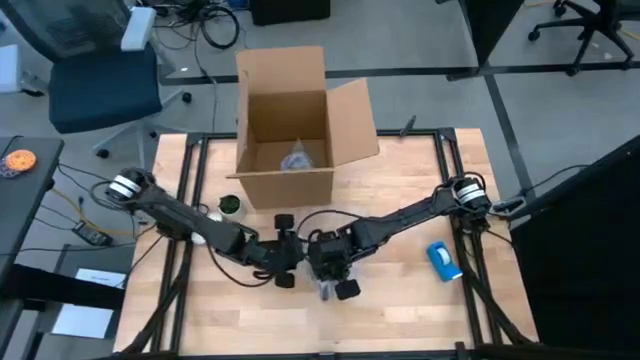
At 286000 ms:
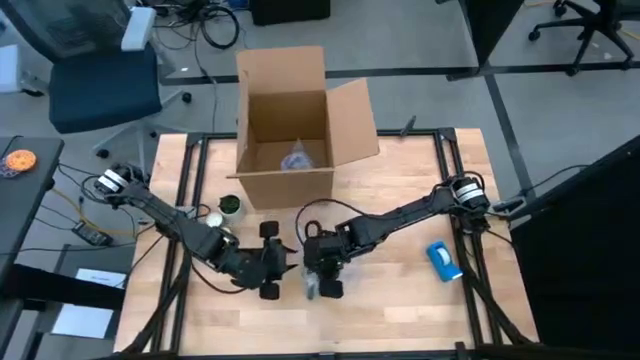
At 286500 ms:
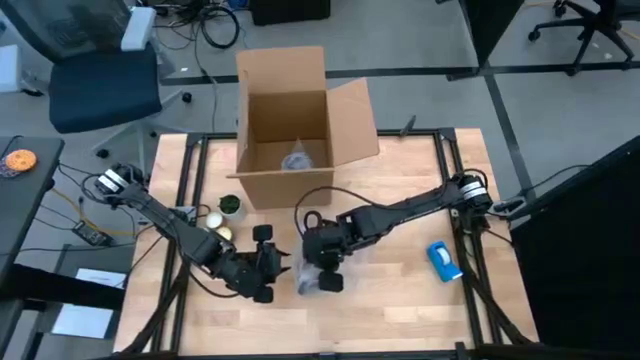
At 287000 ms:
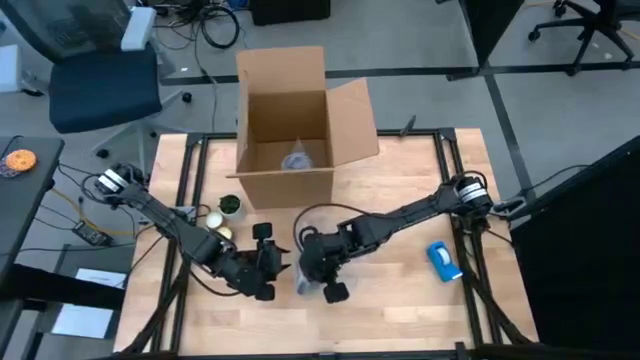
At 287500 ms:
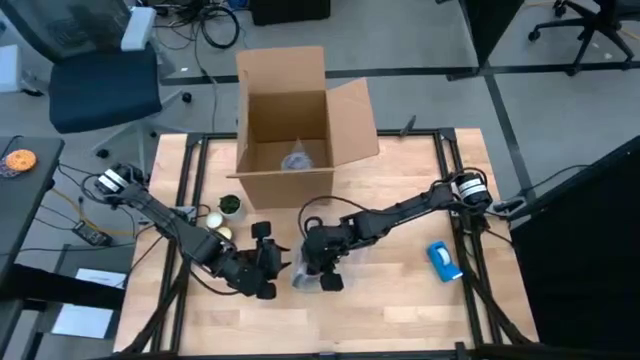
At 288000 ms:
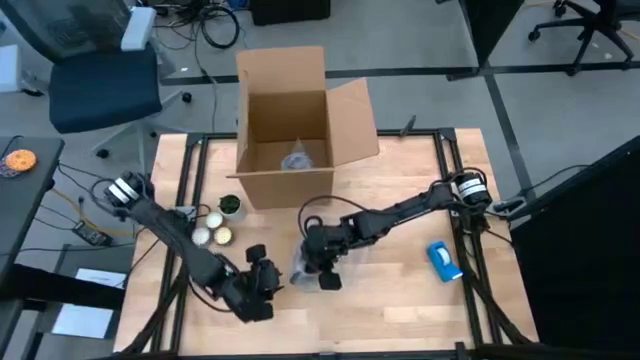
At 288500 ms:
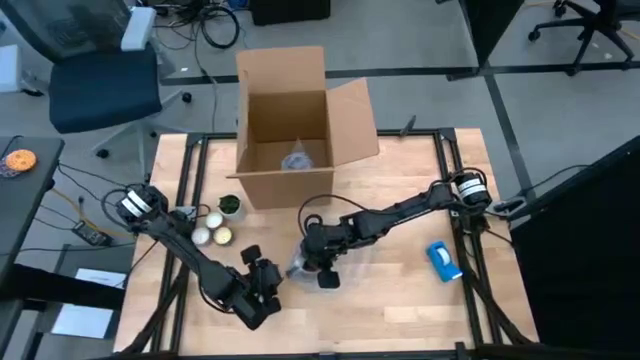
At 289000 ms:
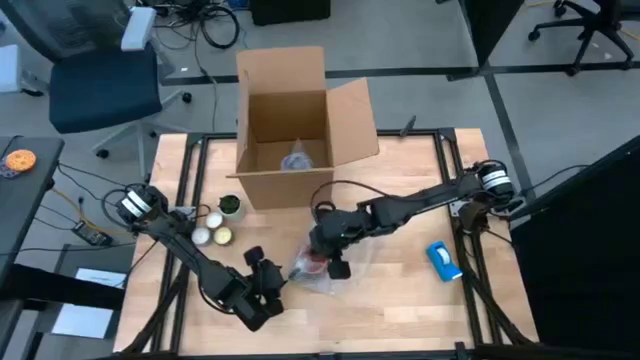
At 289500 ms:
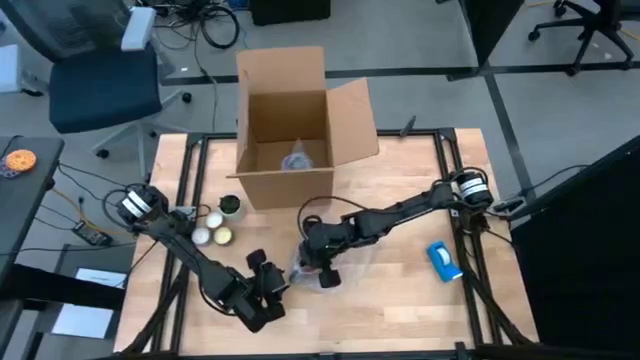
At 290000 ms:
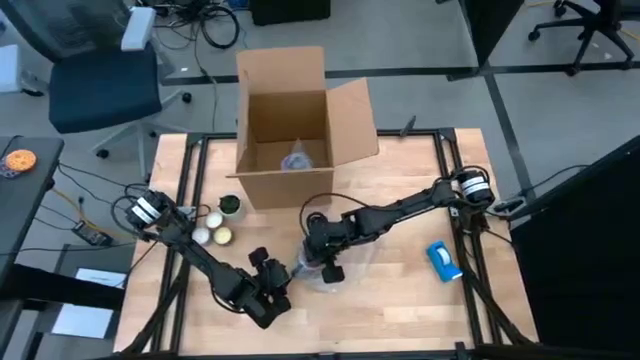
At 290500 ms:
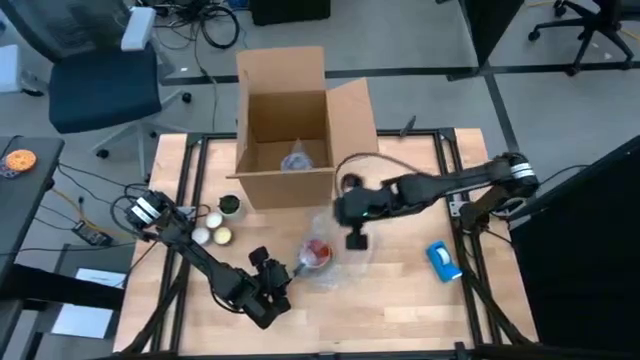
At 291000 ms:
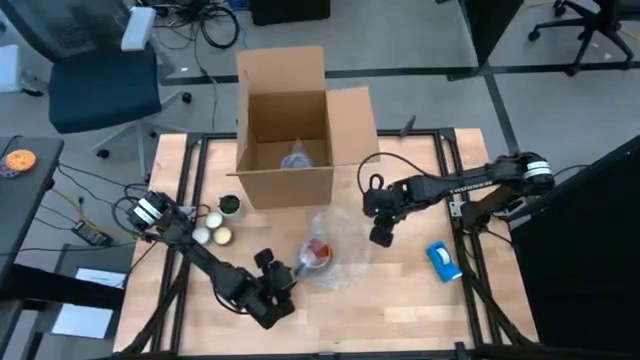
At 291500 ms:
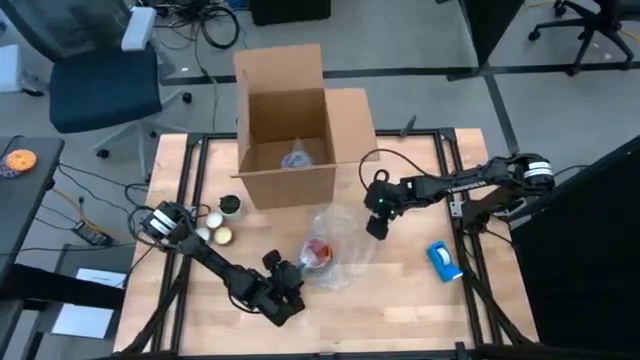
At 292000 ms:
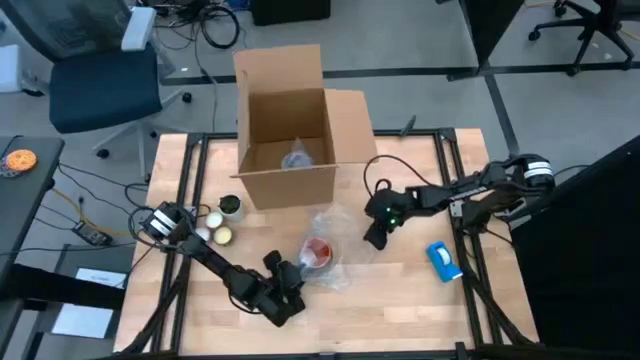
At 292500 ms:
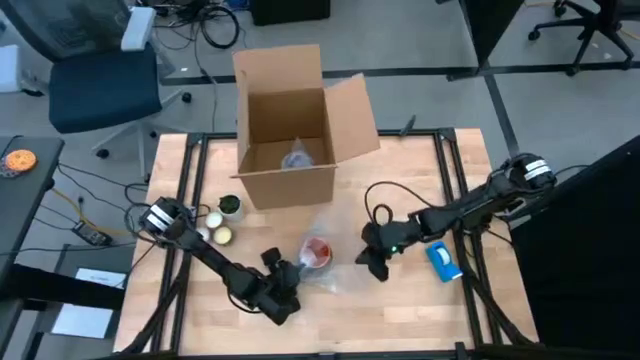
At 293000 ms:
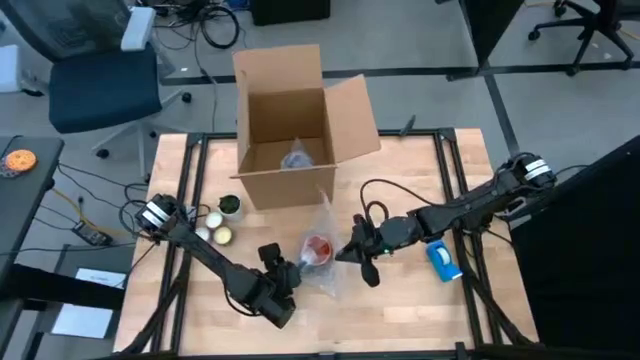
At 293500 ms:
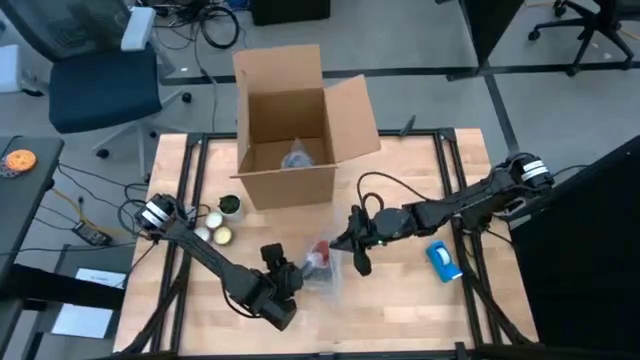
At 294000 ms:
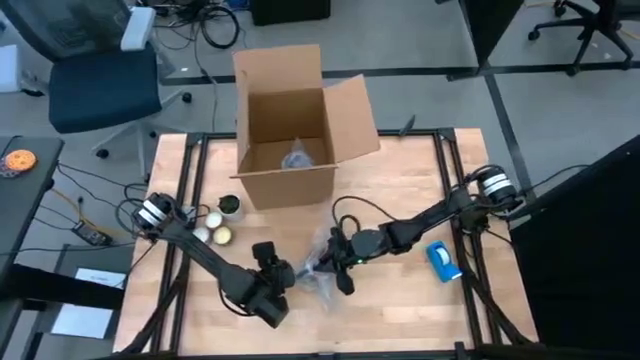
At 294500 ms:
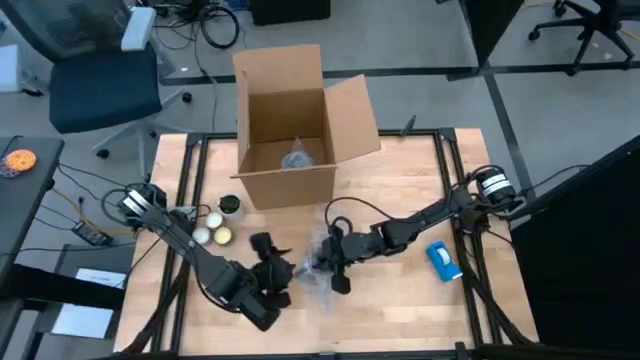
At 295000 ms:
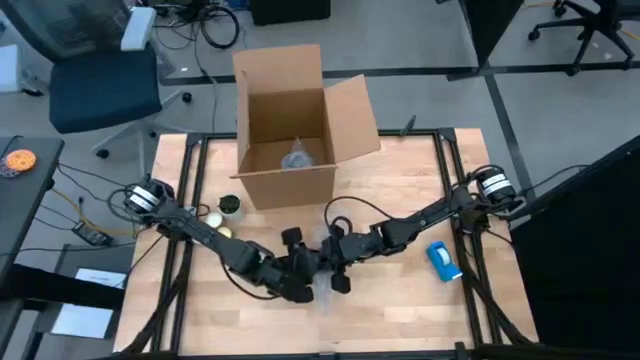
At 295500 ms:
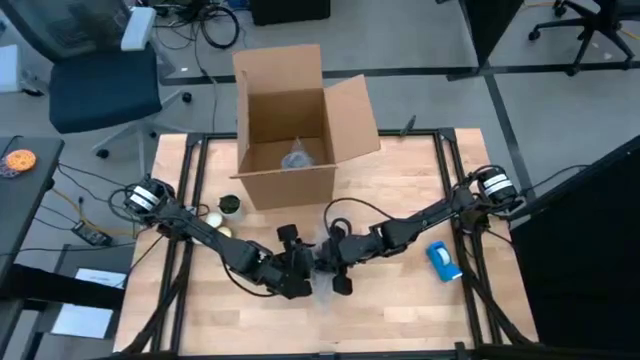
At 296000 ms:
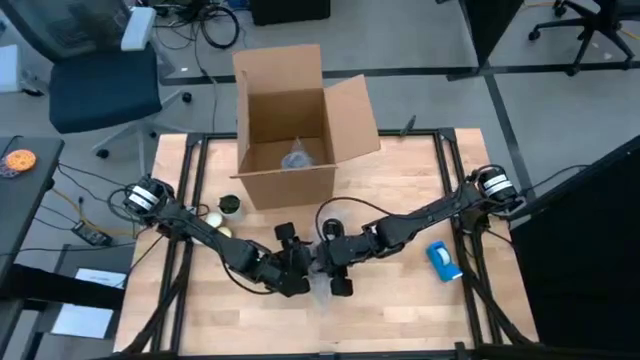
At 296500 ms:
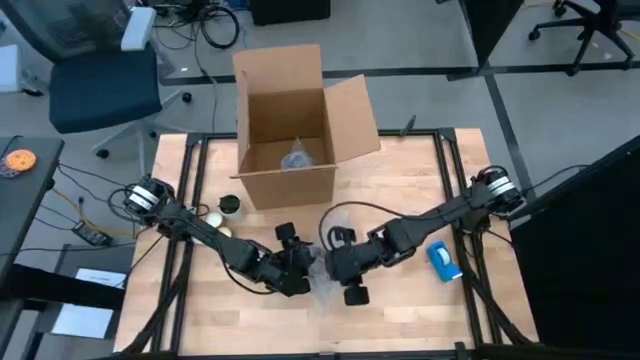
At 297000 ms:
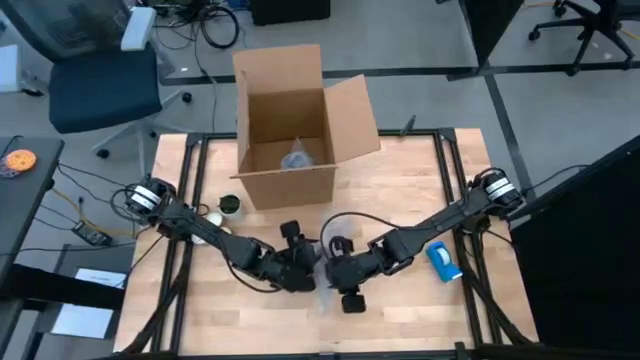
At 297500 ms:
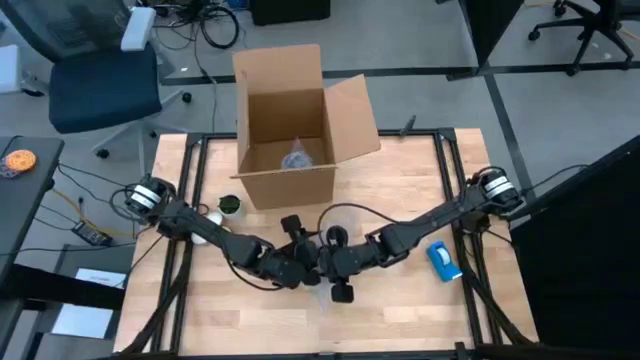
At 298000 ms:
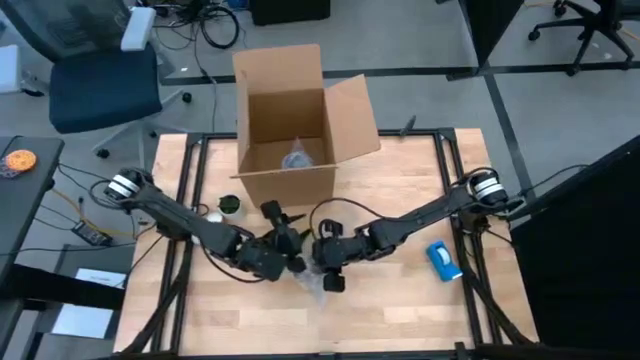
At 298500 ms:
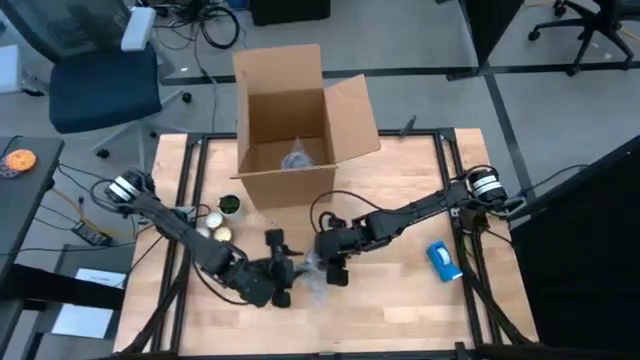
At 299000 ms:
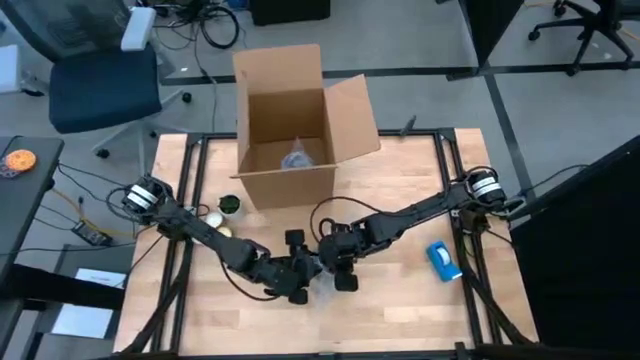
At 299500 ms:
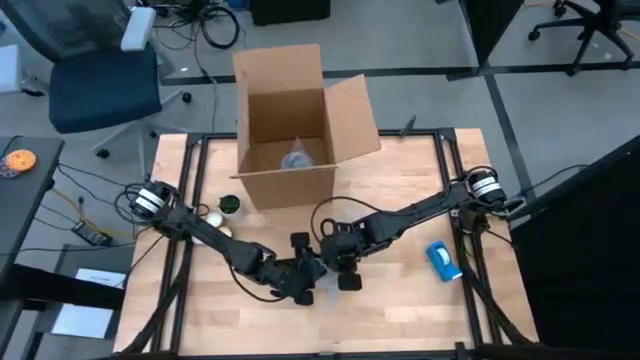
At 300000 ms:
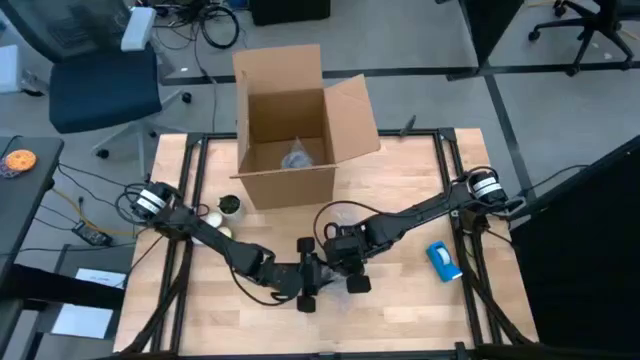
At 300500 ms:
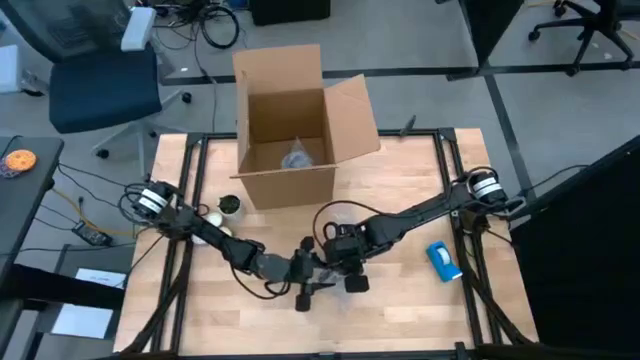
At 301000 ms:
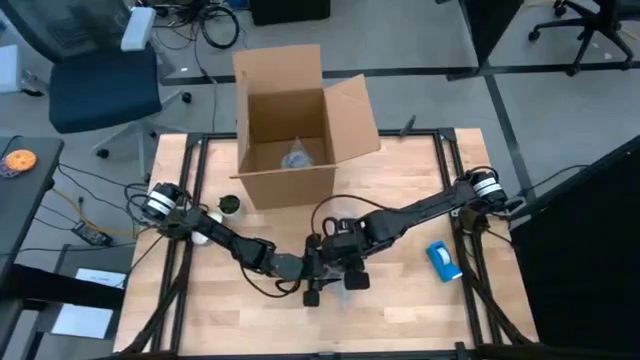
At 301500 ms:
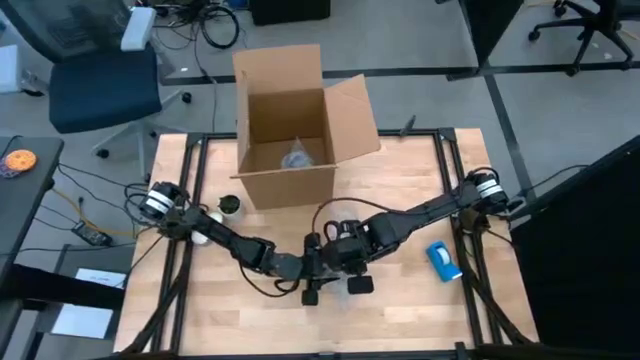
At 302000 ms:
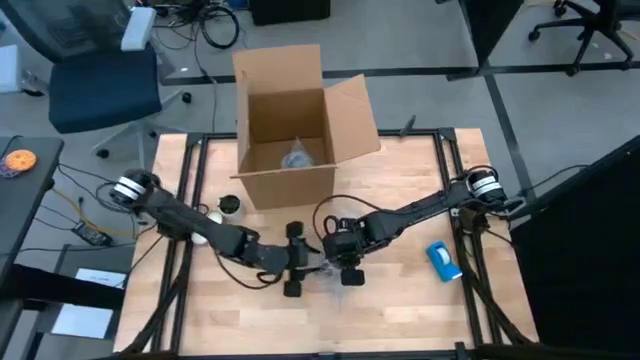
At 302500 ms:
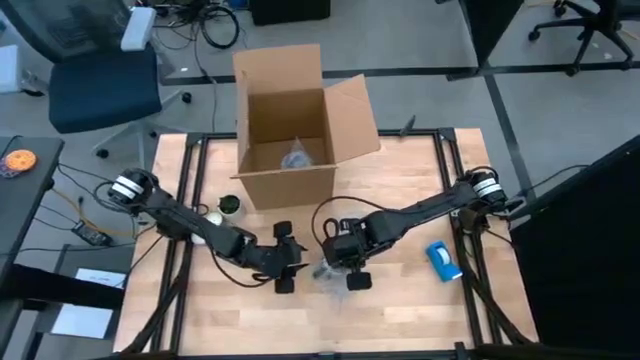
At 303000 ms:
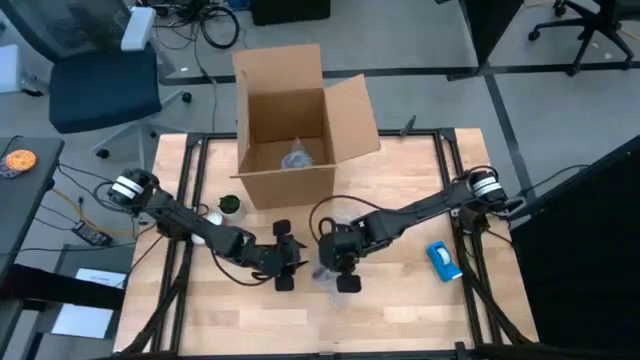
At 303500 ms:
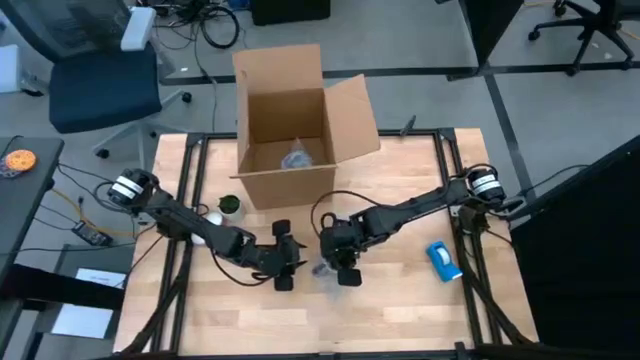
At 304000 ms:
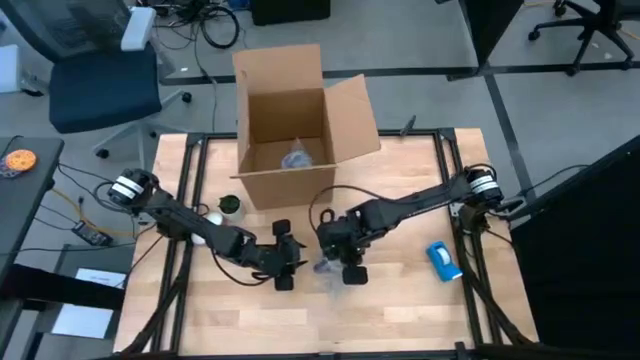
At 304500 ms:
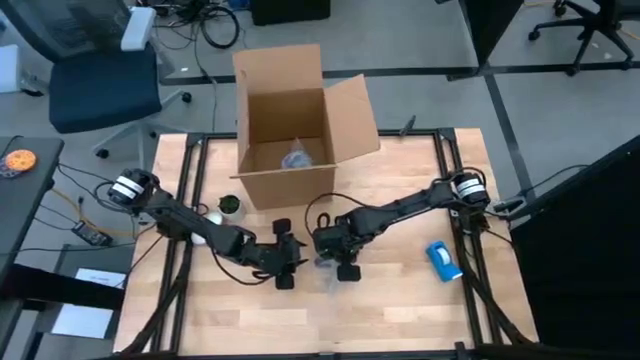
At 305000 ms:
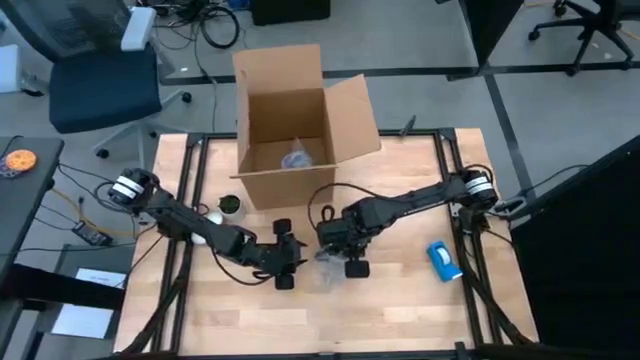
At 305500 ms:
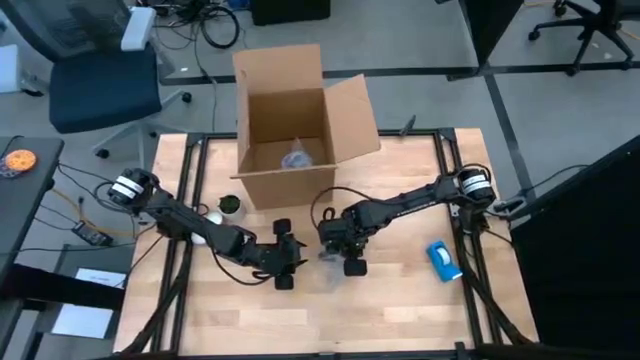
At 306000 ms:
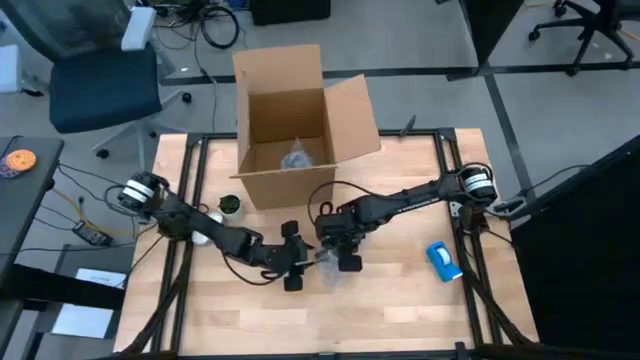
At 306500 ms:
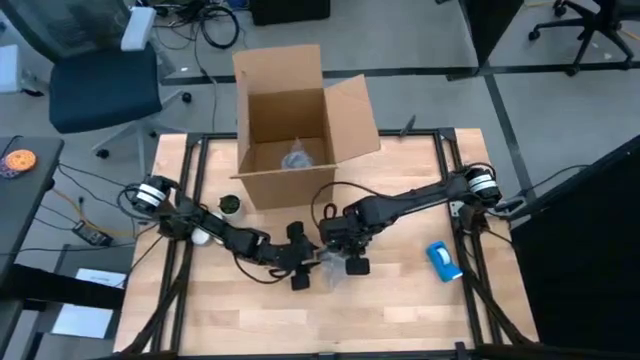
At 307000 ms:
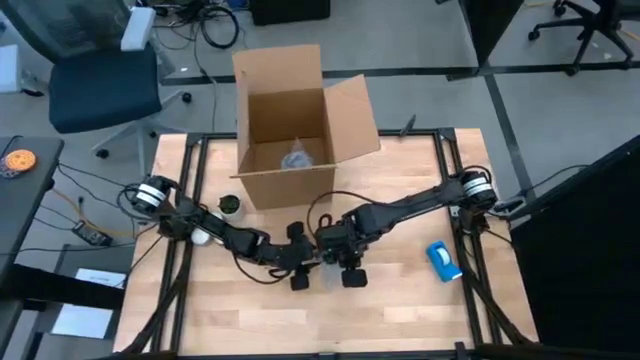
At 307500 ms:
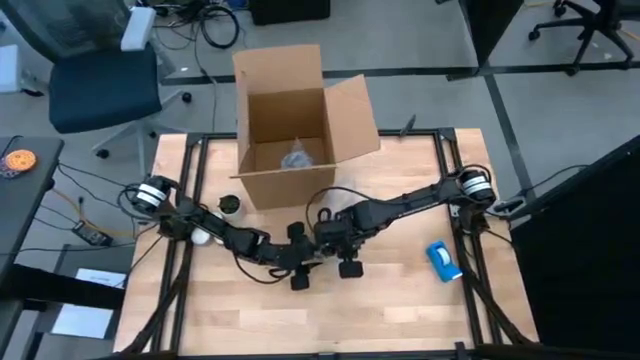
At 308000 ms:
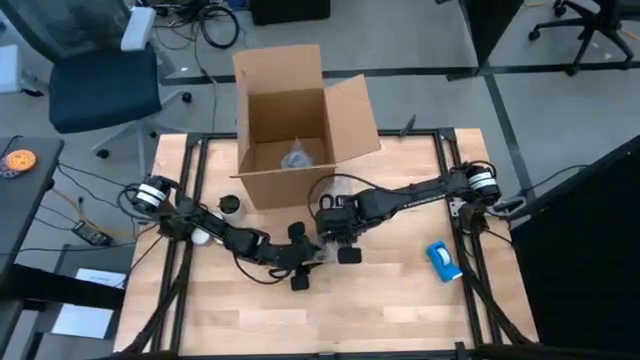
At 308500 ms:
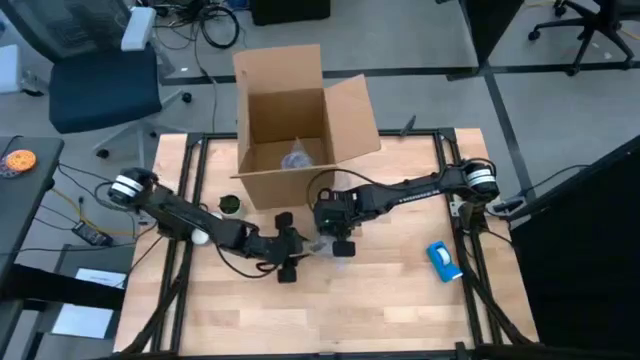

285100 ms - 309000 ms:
Task: wrap mug
Wrap the black mug with bubble wrap
